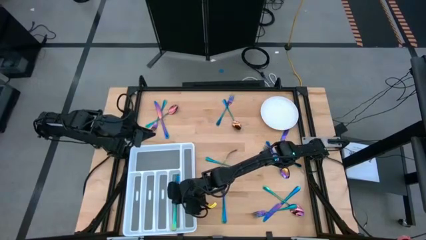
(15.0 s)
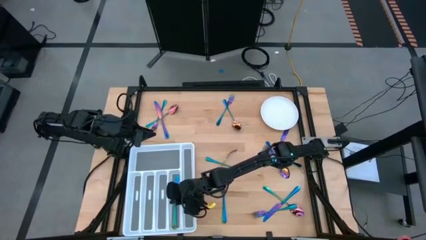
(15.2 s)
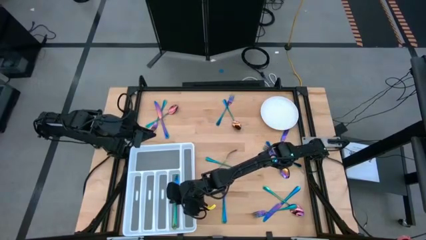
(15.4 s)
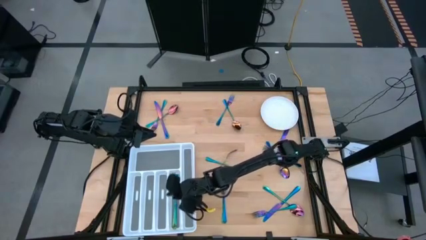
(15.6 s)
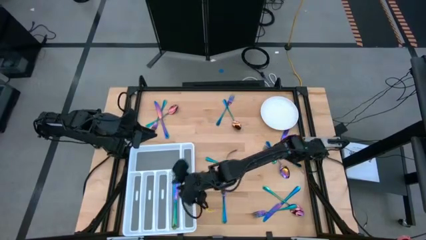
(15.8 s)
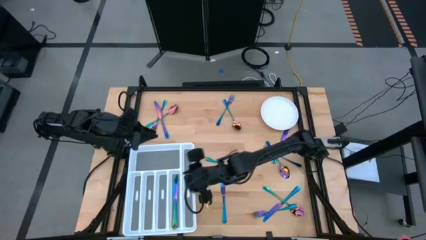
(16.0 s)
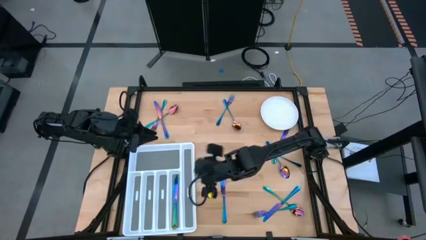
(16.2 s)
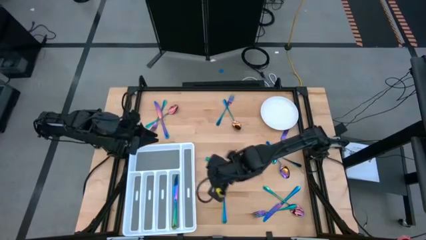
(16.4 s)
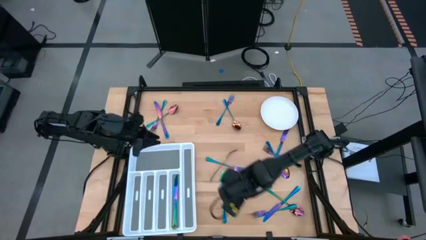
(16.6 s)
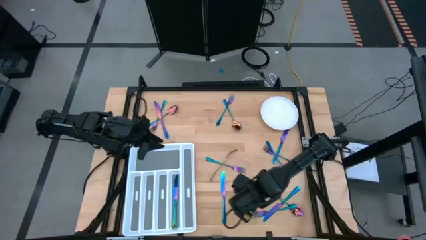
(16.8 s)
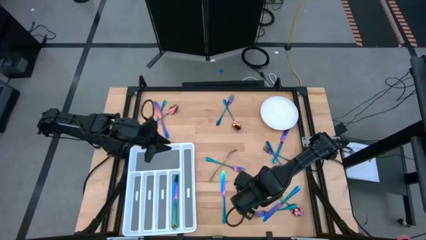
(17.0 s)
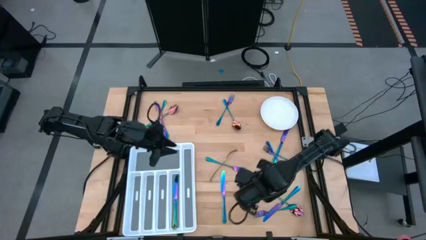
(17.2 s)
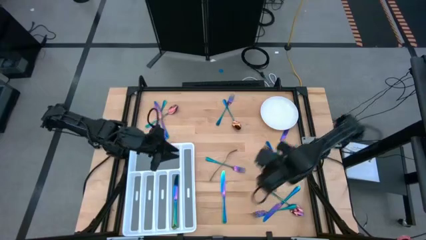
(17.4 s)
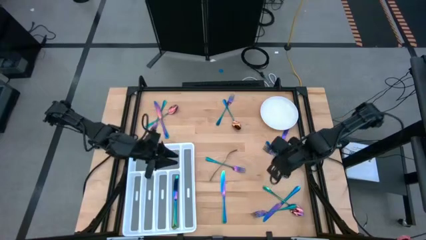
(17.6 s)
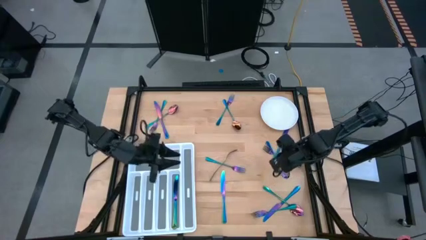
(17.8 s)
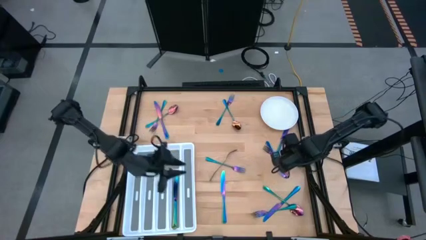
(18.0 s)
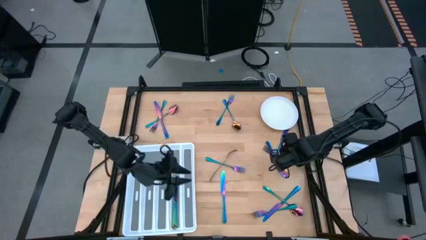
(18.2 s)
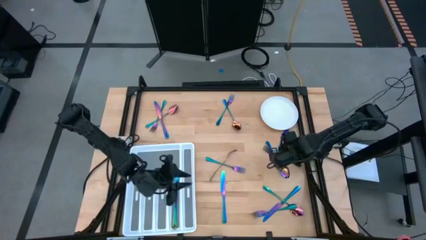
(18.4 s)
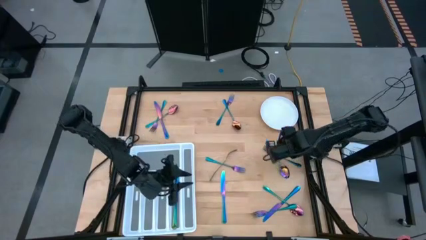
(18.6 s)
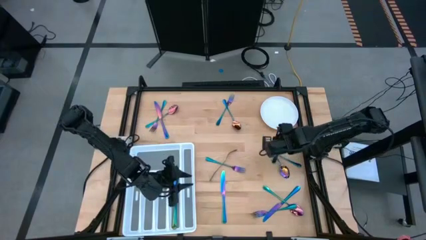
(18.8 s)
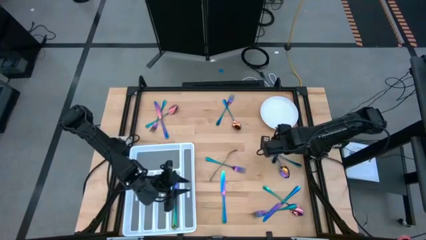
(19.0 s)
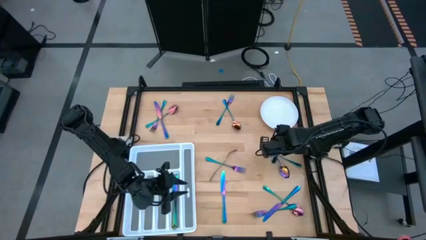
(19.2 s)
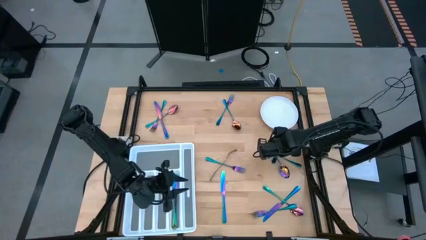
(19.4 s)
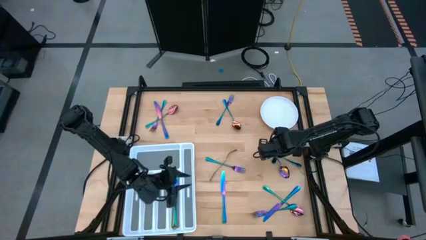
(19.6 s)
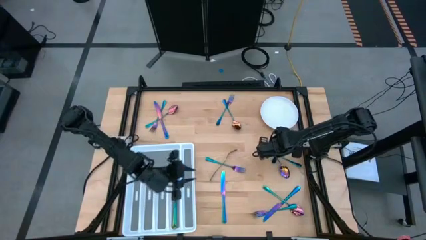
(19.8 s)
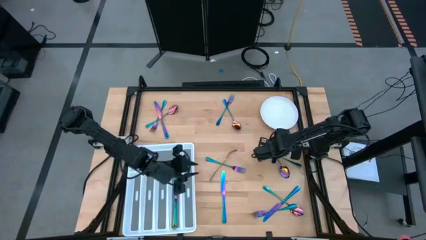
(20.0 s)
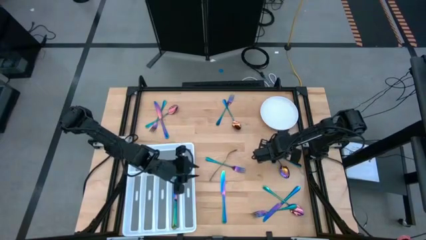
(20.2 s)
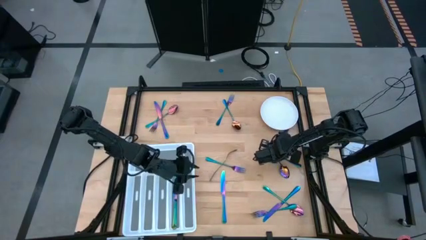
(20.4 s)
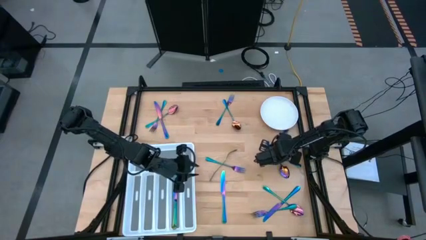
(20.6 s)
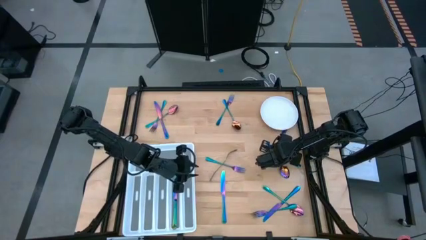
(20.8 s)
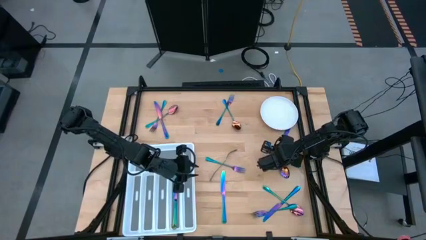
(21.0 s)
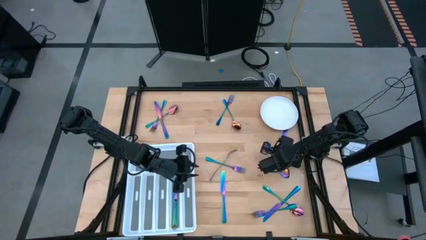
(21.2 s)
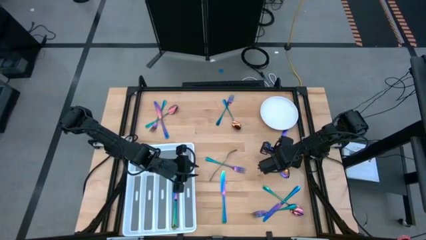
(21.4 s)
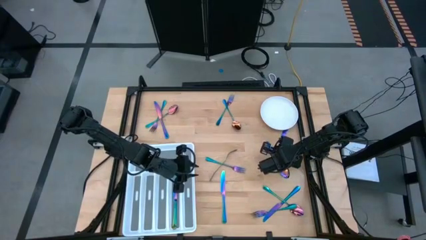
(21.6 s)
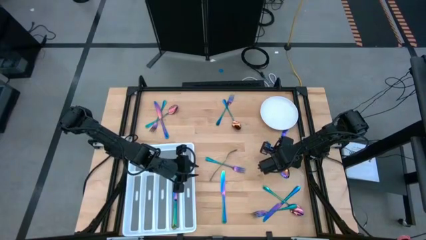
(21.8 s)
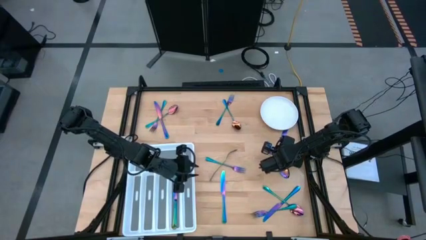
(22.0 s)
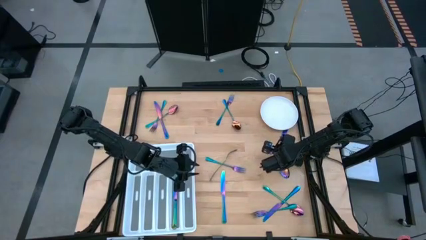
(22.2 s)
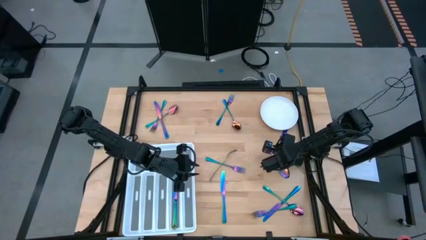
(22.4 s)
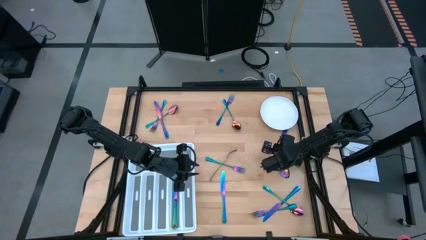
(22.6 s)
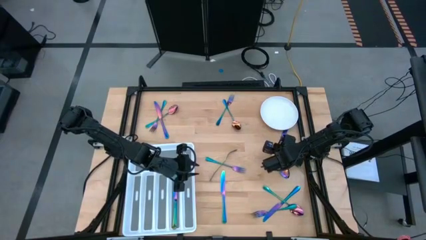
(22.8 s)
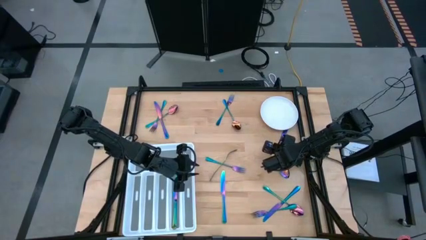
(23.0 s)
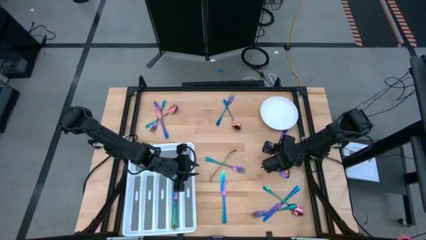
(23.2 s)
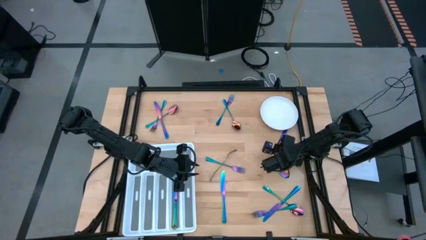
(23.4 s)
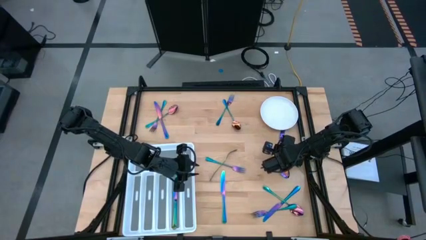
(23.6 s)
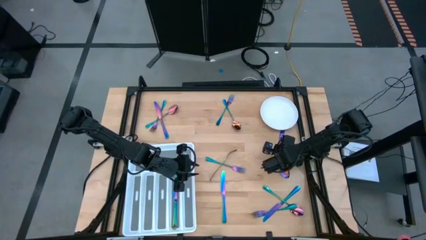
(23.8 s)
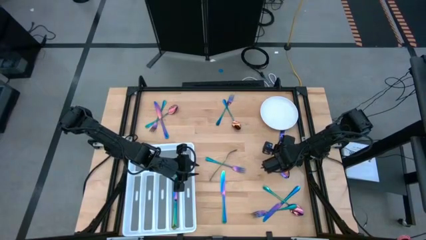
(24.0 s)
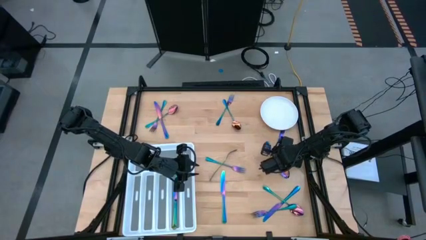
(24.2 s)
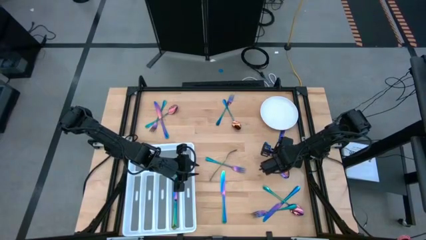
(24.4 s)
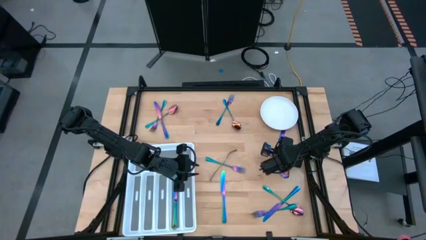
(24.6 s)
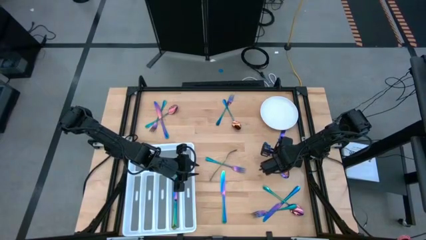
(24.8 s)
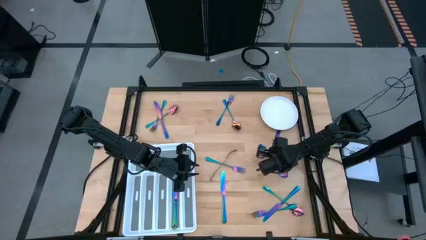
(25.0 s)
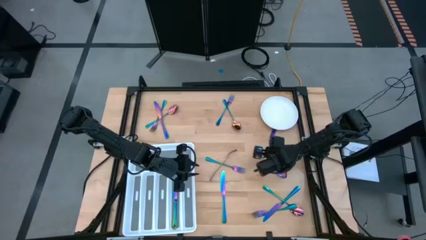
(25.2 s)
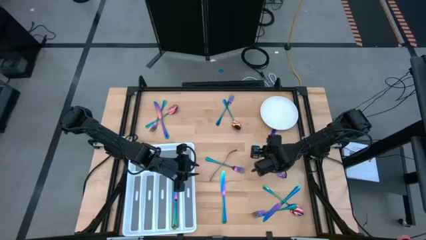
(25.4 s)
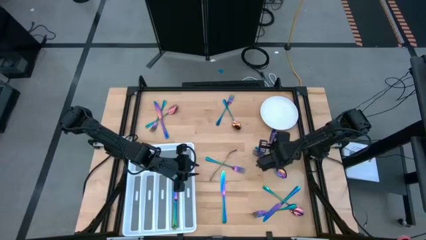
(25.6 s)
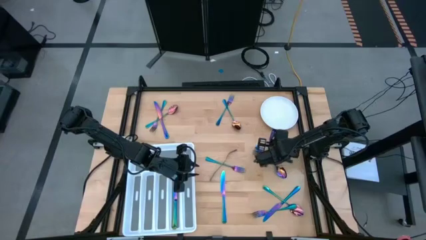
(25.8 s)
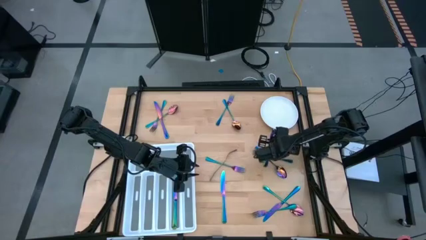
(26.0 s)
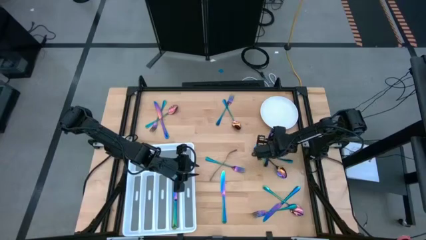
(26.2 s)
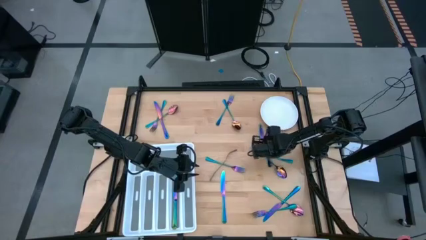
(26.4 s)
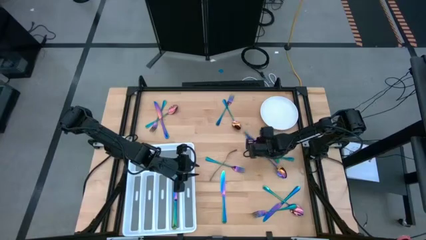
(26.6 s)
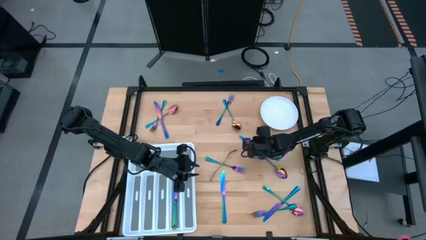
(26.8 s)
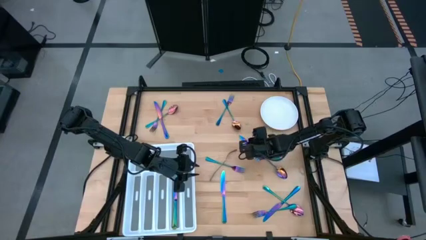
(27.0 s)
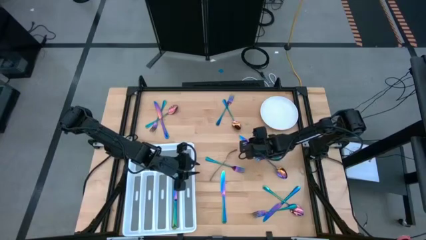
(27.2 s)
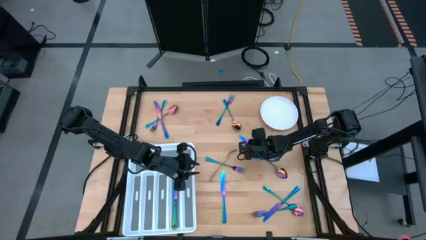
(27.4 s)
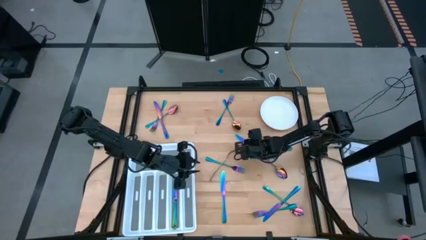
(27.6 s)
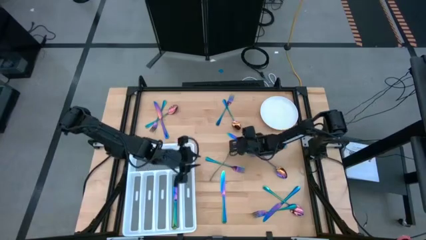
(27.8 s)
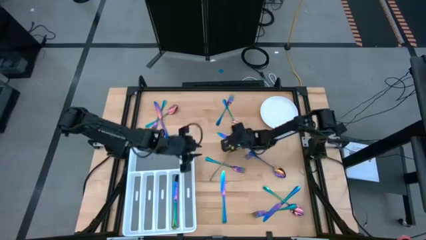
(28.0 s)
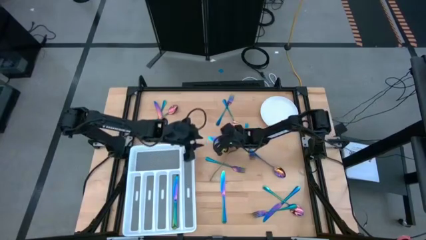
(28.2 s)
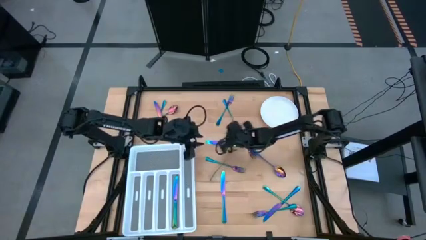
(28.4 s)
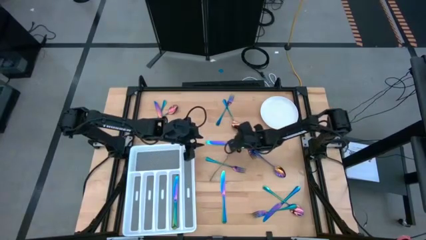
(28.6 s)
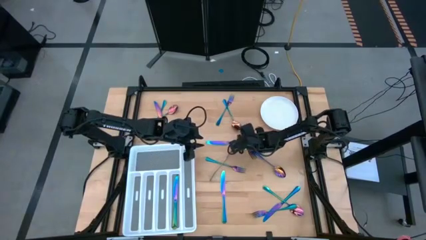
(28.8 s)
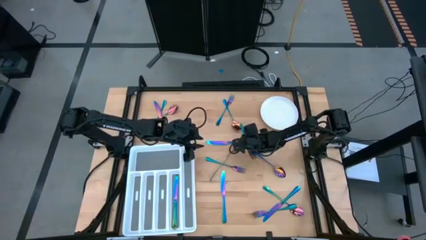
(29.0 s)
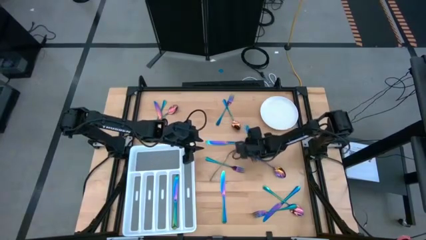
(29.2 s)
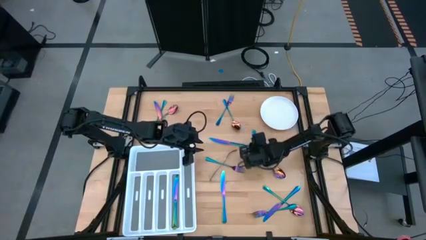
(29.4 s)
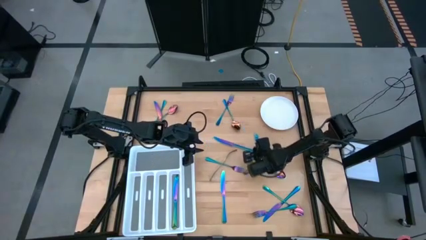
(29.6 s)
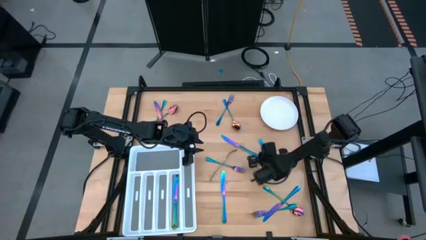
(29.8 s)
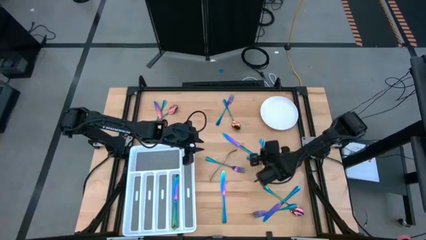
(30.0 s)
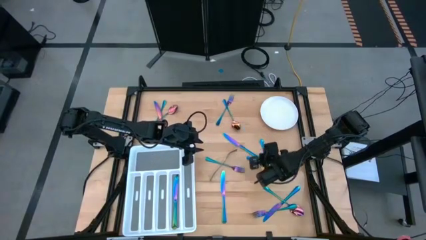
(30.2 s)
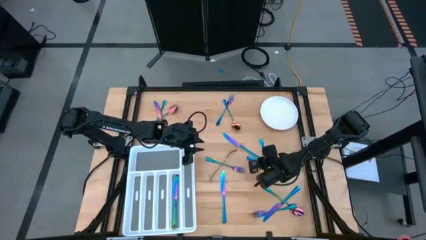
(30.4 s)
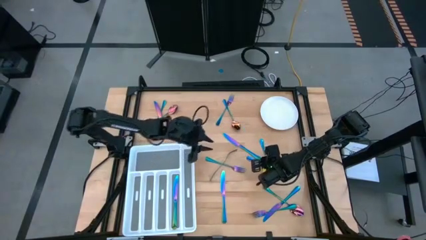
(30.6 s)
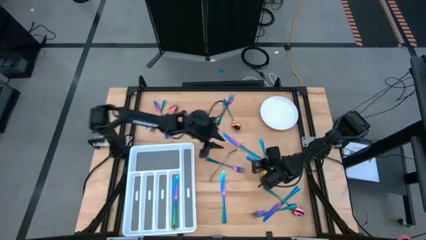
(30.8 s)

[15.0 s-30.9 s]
Task: Sort silverware
Put the top right iridescent knife into the cutlery tray
